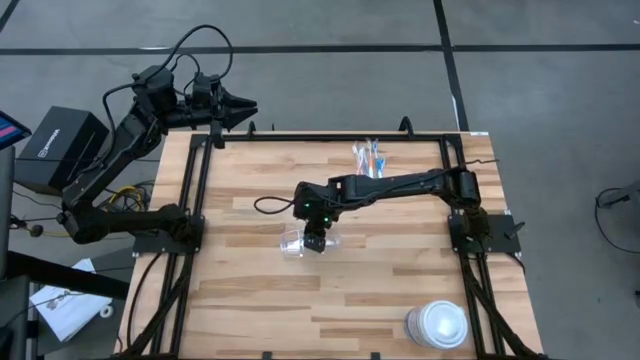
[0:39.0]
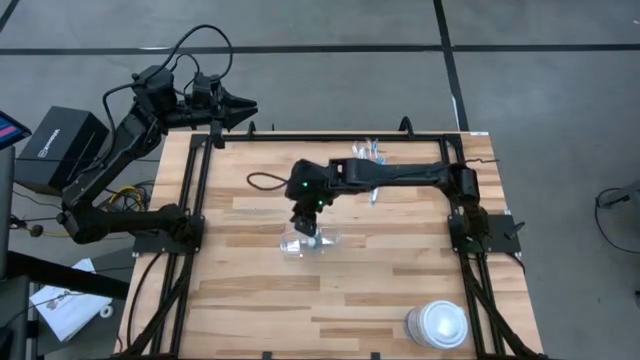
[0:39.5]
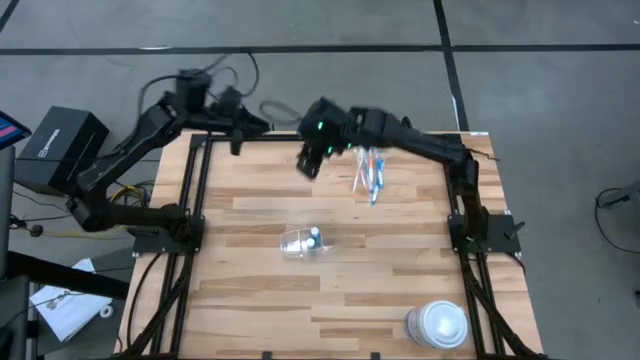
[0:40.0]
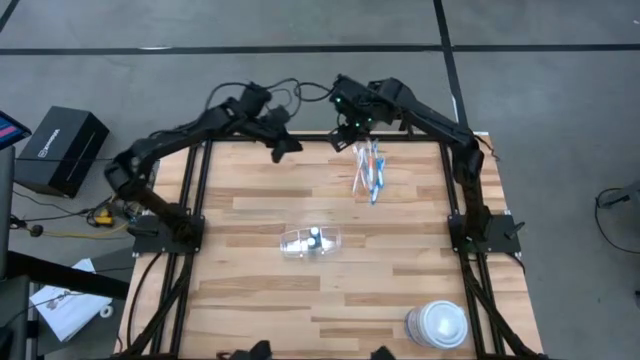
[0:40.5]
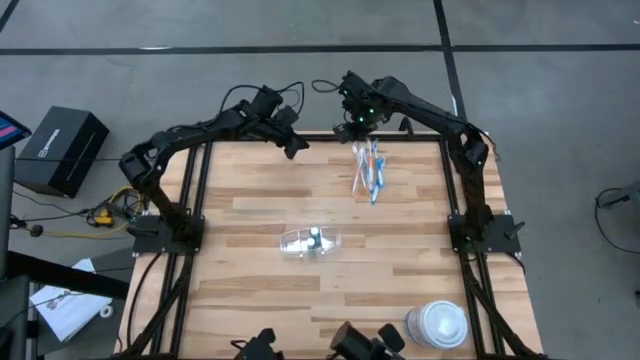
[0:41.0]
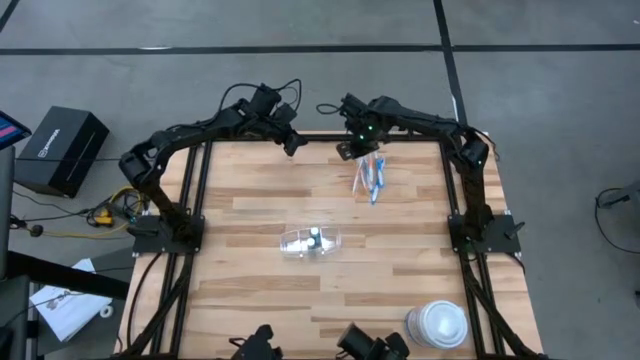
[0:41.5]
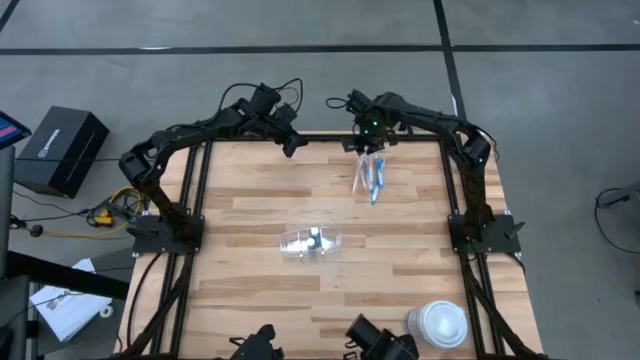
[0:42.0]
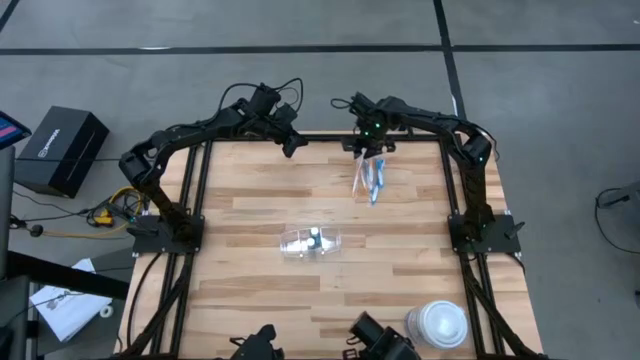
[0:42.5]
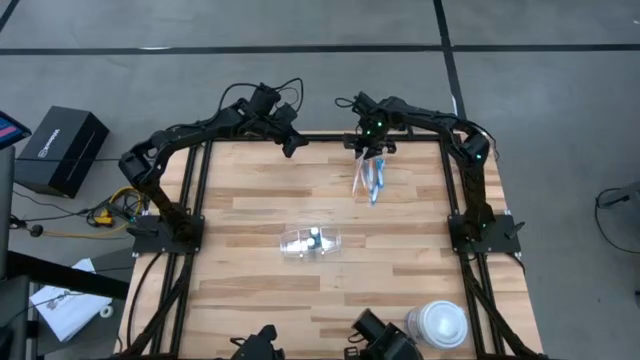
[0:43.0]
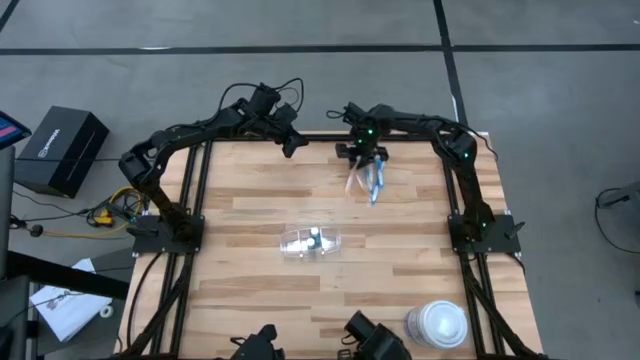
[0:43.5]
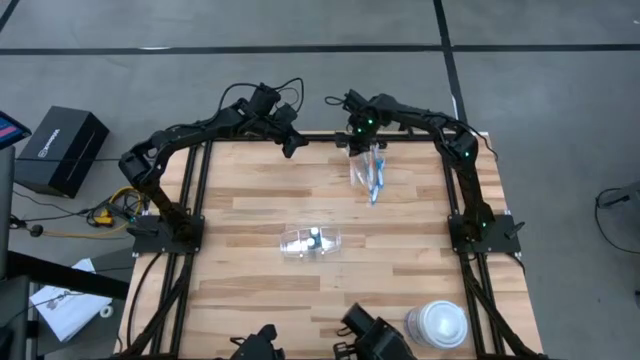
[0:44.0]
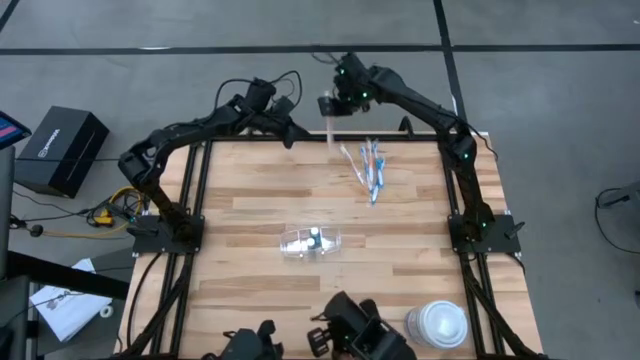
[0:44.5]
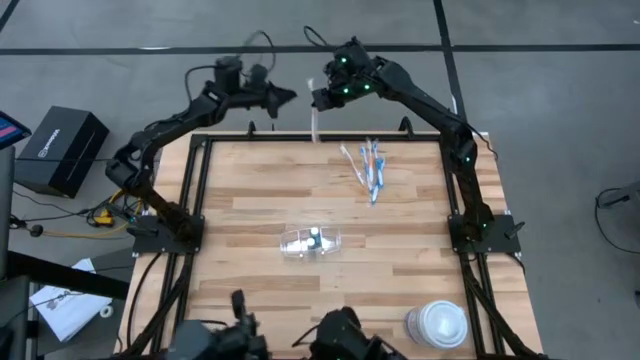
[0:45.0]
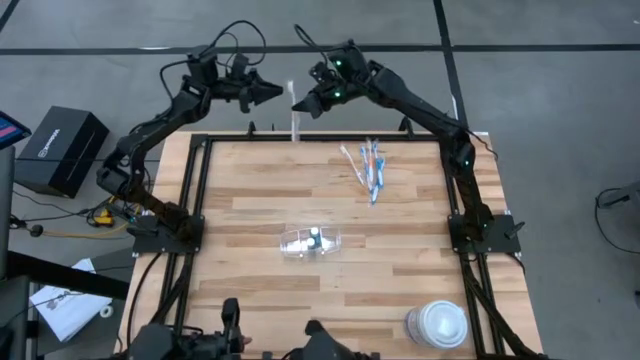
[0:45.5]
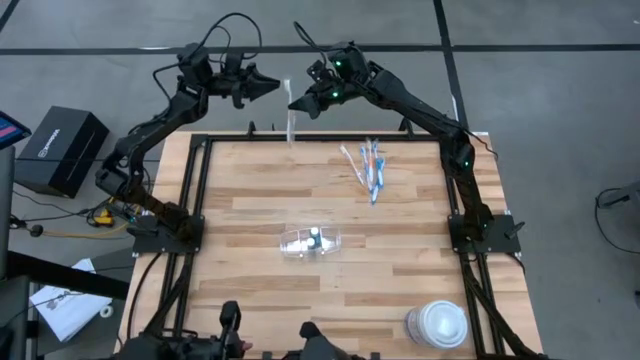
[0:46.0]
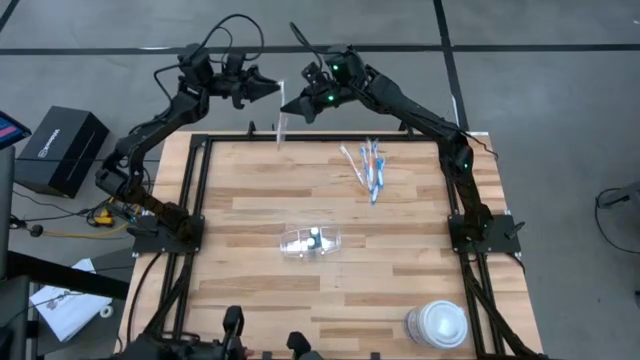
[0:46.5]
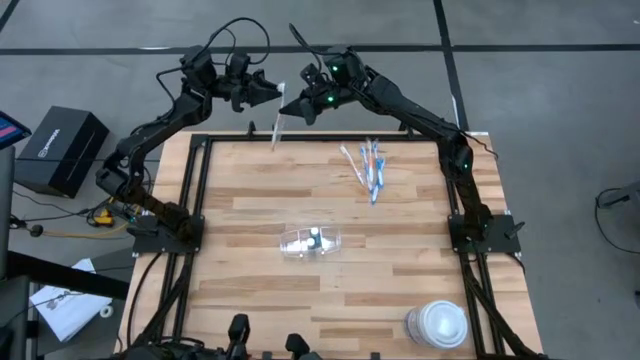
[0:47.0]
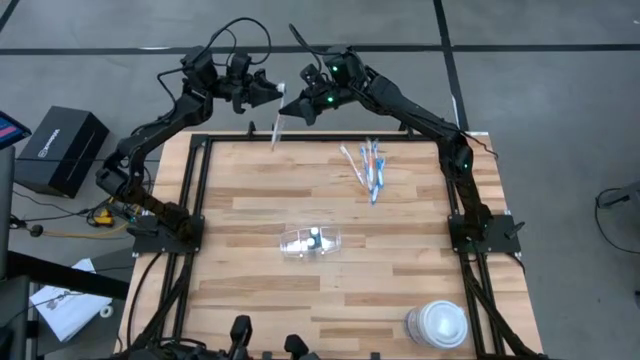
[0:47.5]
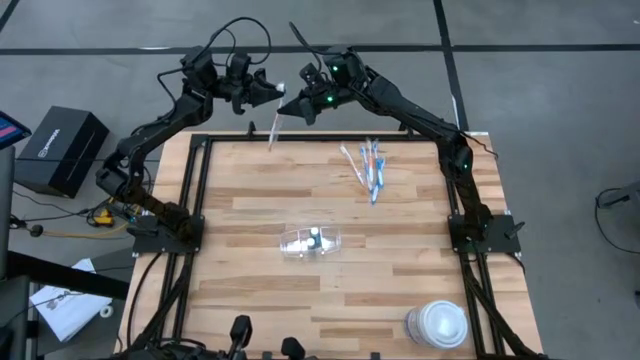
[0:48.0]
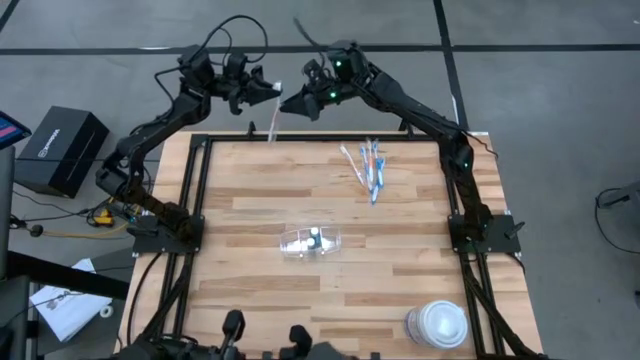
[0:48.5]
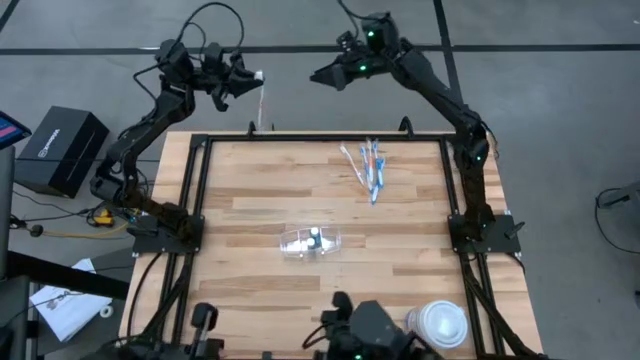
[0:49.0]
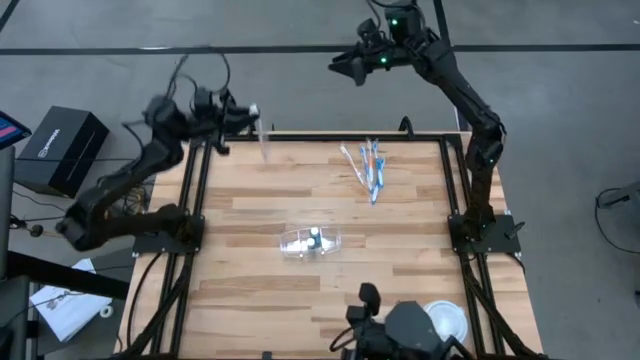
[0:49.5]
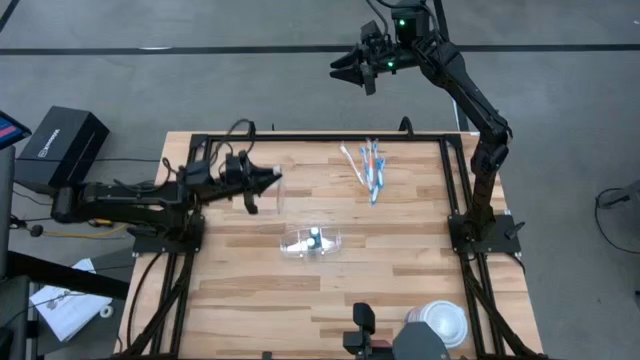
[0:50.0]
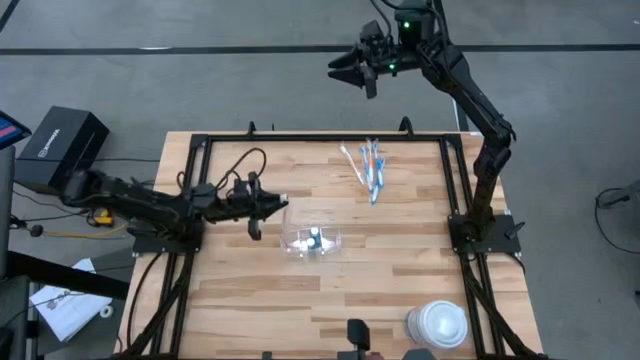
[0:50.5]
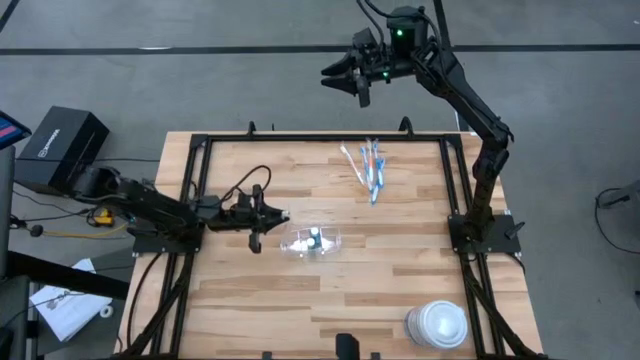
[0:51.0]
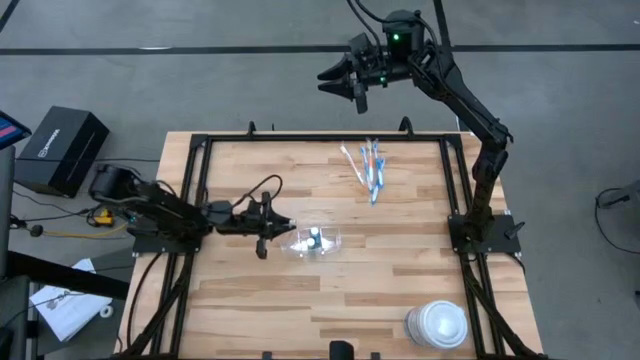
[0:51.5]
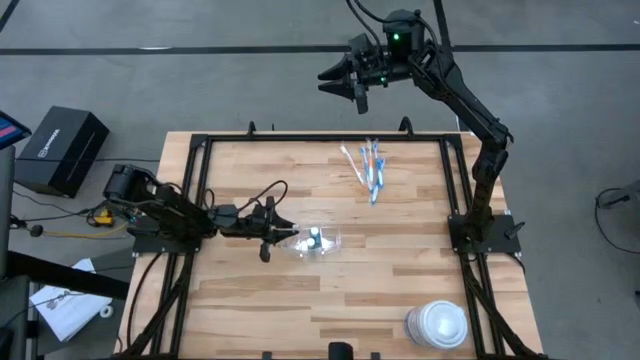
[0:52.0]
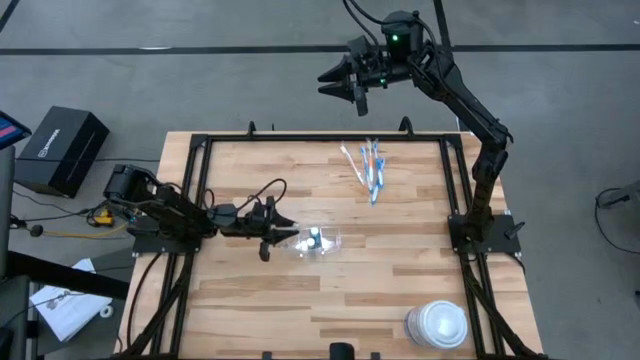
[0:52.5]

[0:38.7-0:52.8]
Task: Pick & Place toothbrushing station
Put the top left orange toothbrush into the transparent organizer

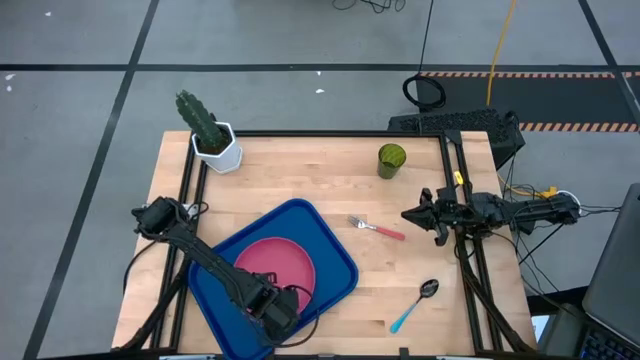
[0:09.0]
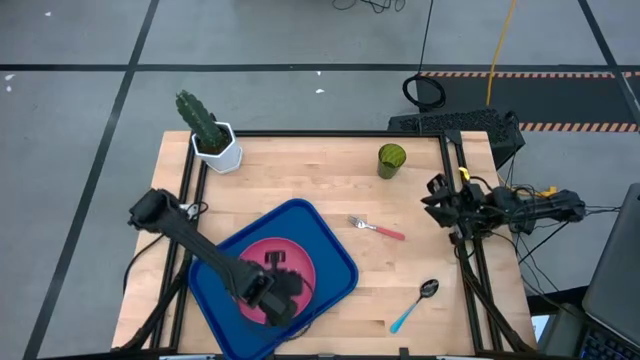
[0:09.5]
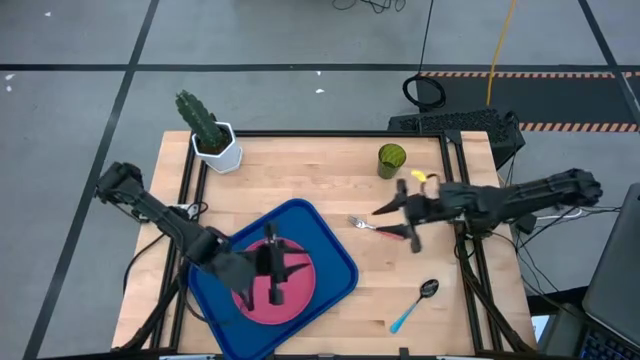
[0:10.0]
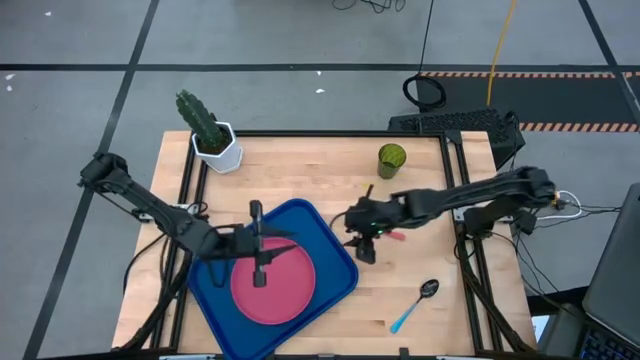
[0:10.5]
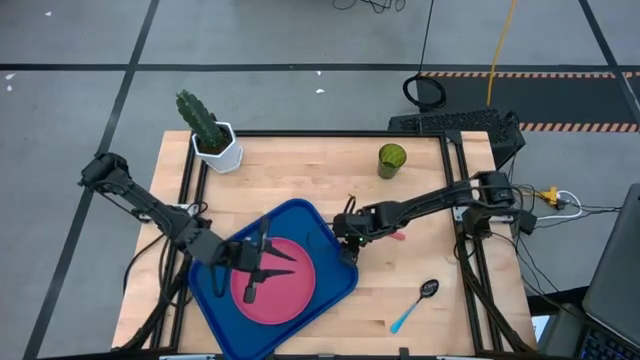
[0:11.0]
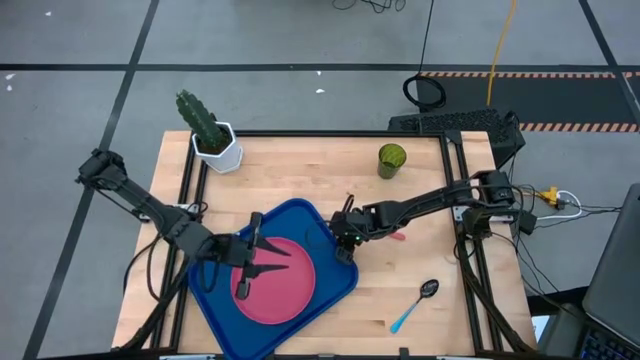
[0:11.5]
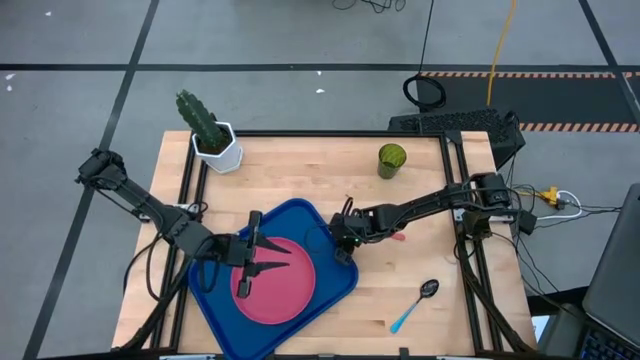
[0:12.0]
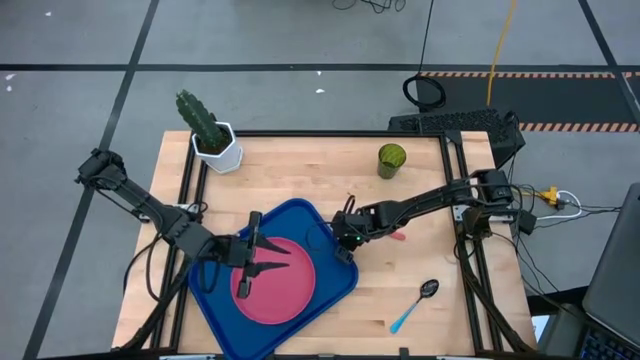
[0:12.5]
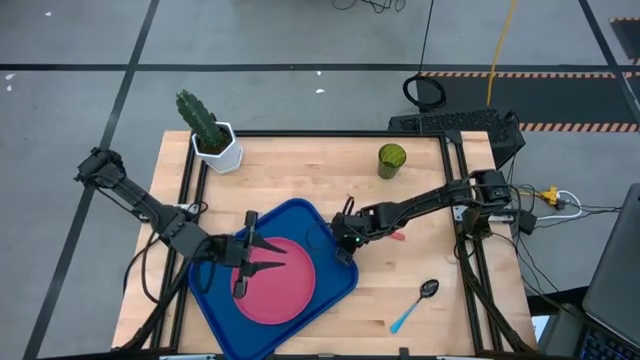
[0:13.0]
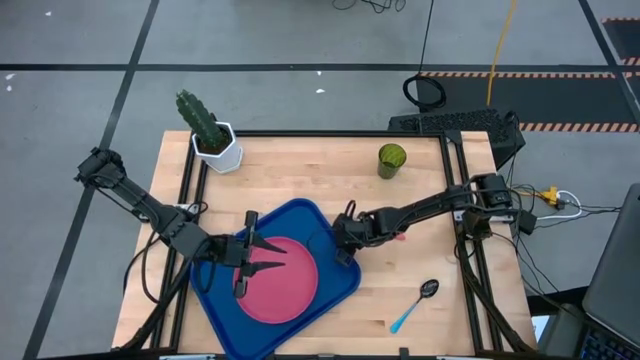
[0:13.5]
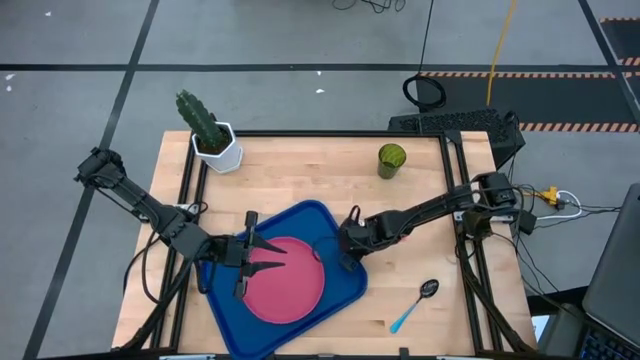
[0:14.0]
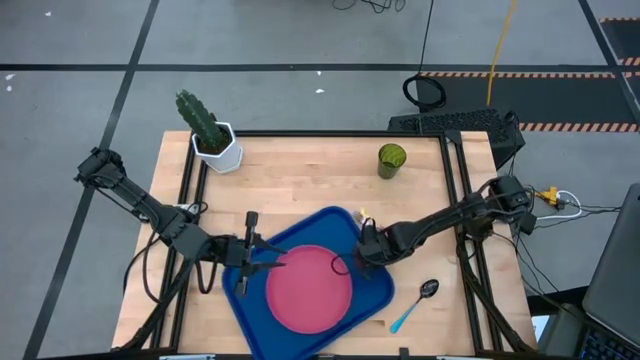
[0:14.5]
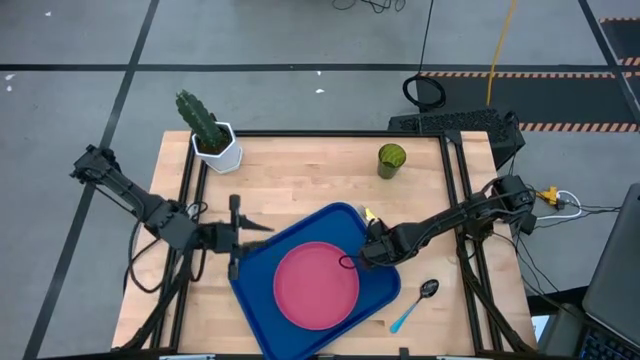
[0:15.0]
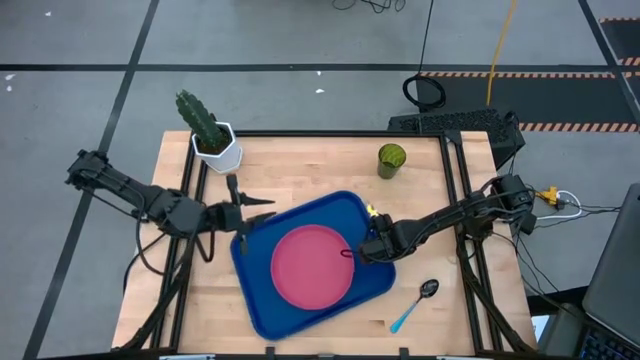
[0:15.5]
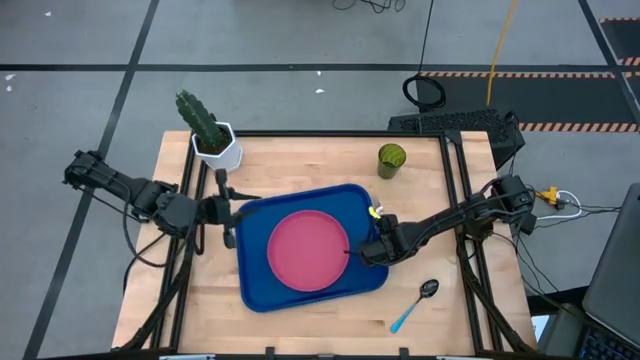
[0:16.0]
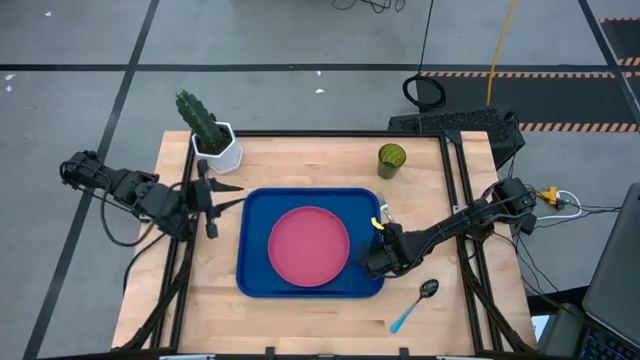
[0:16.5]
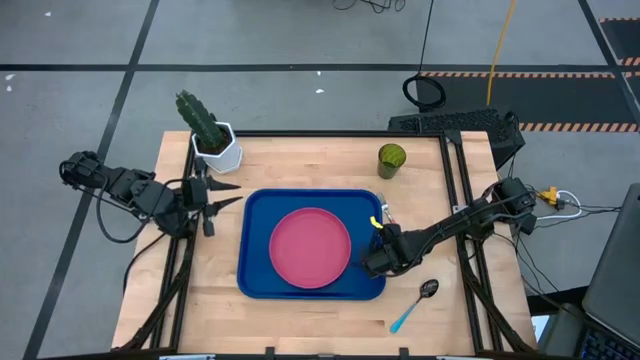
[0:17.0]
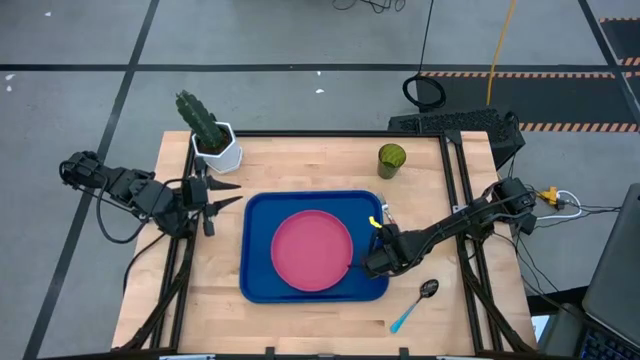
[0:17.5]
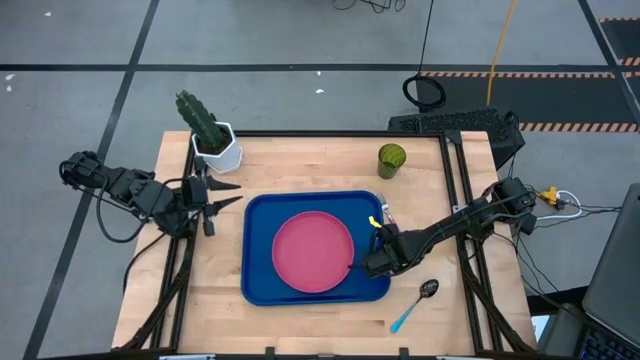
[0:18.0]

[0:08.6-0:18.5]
Task: Pick and place plate/cup/fork/spoon on tray
Move the blue serving tray to the center of the table
